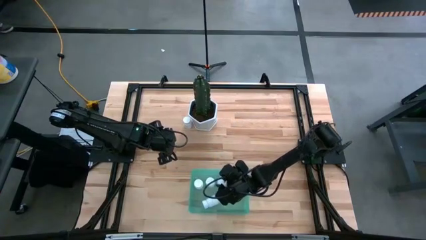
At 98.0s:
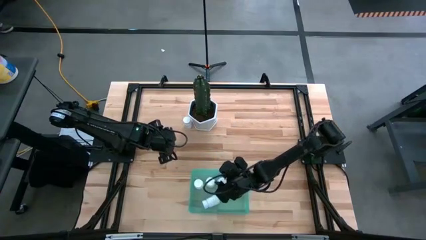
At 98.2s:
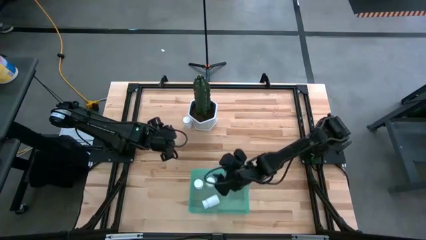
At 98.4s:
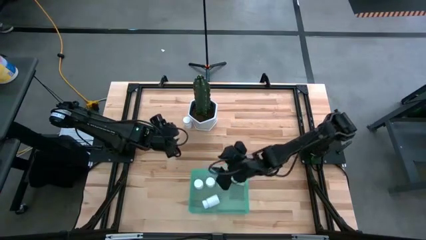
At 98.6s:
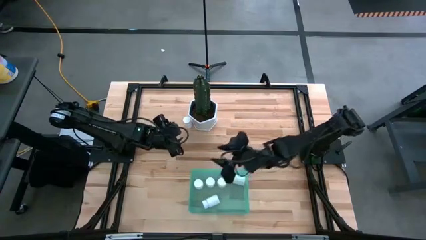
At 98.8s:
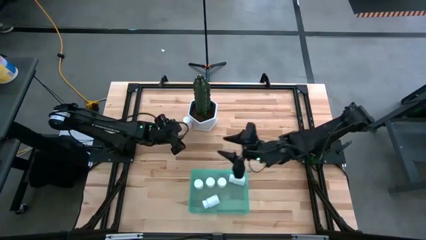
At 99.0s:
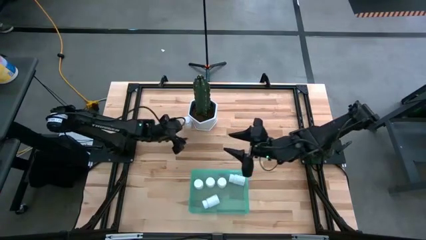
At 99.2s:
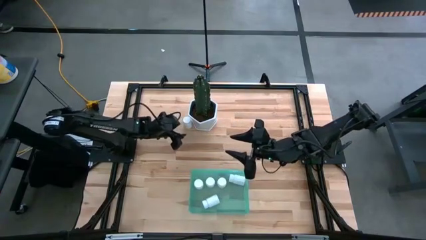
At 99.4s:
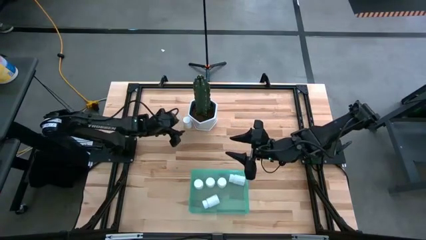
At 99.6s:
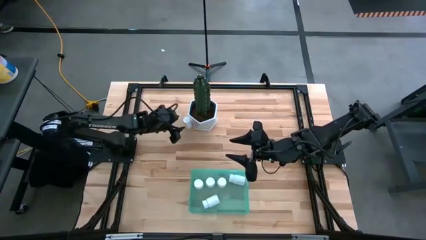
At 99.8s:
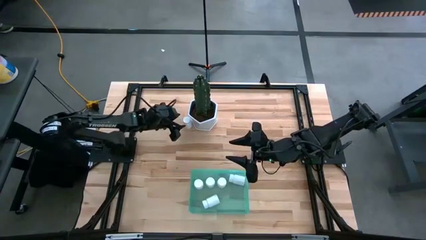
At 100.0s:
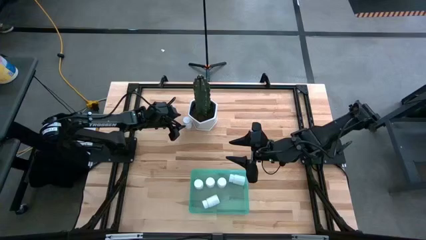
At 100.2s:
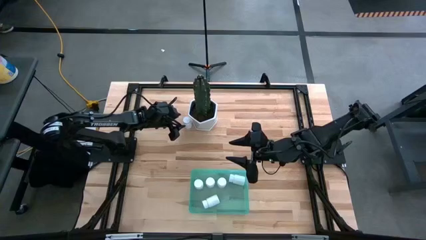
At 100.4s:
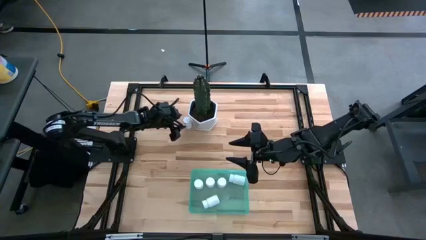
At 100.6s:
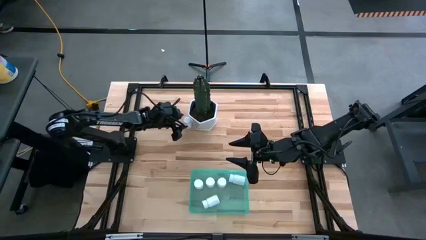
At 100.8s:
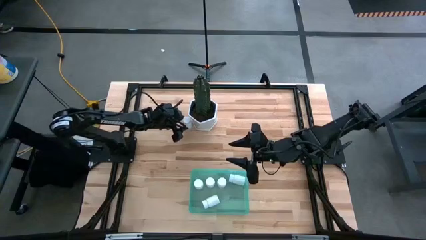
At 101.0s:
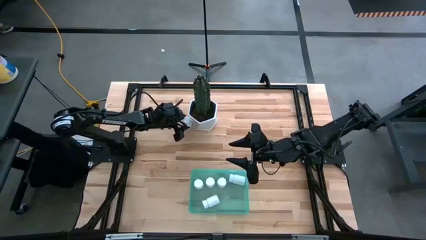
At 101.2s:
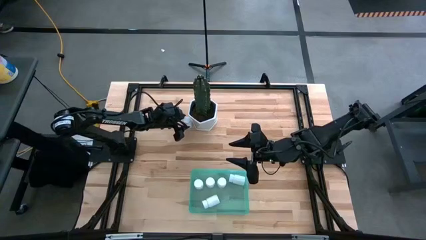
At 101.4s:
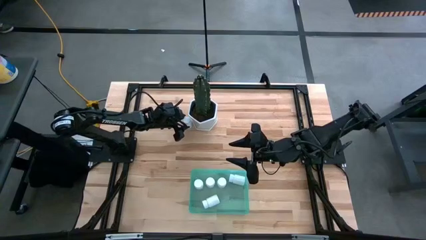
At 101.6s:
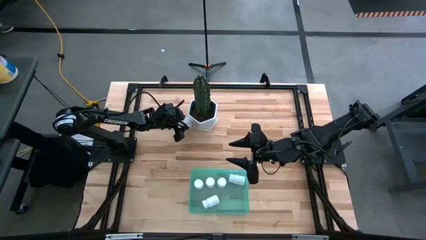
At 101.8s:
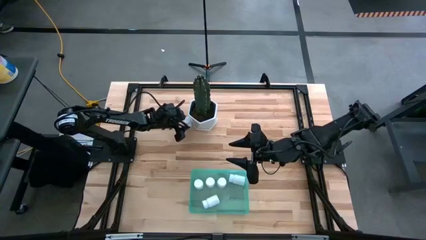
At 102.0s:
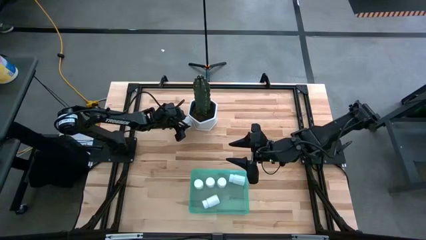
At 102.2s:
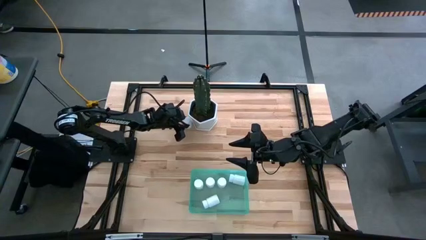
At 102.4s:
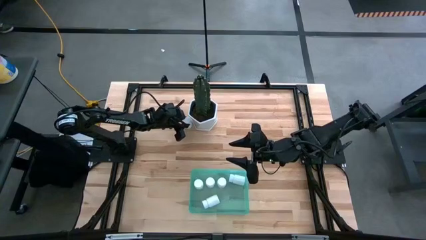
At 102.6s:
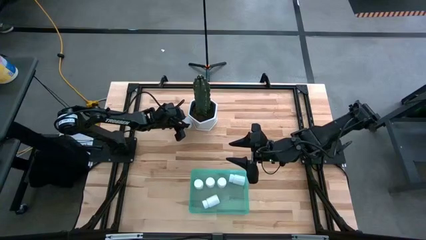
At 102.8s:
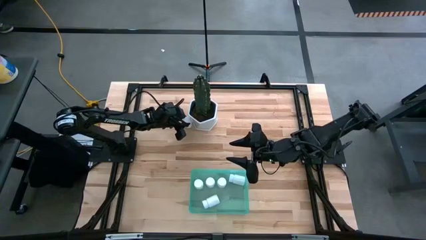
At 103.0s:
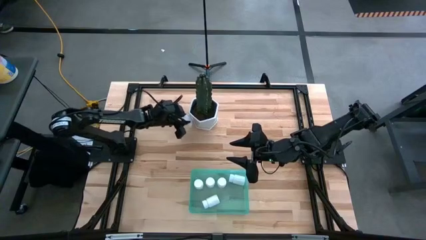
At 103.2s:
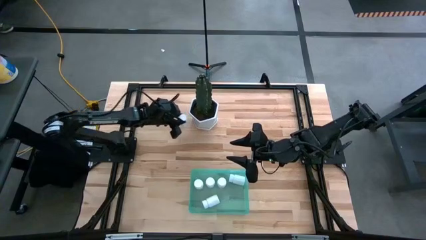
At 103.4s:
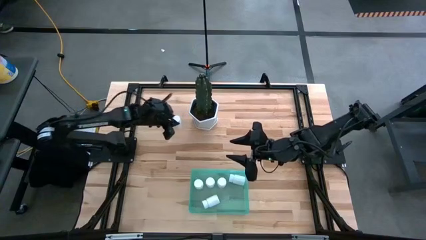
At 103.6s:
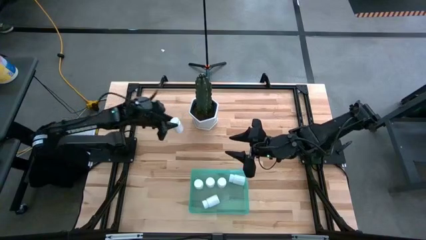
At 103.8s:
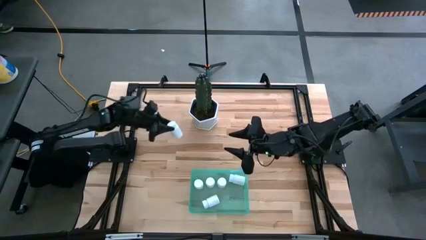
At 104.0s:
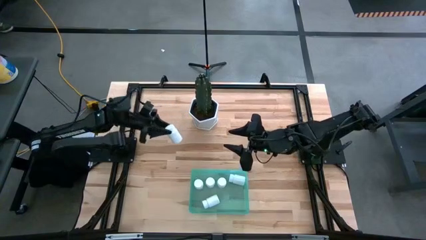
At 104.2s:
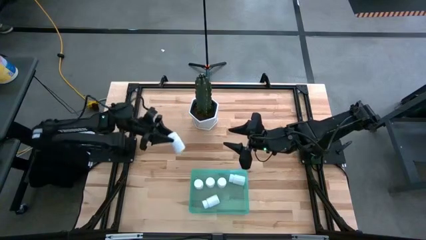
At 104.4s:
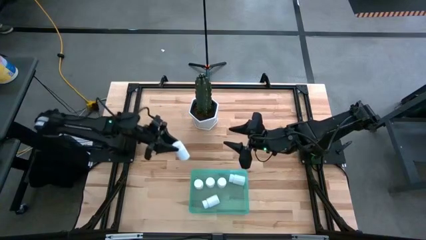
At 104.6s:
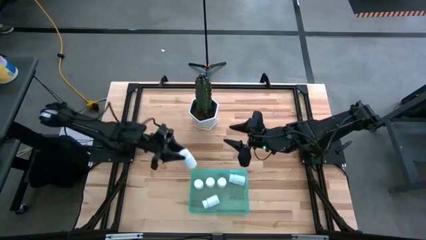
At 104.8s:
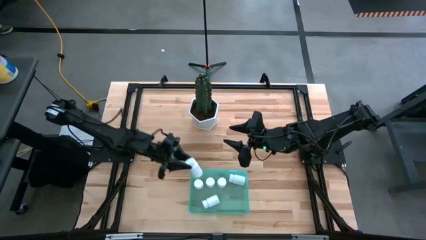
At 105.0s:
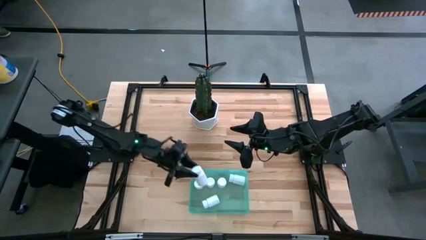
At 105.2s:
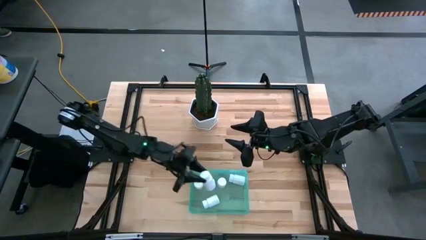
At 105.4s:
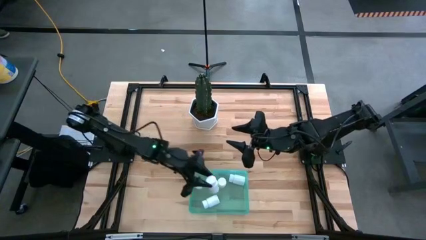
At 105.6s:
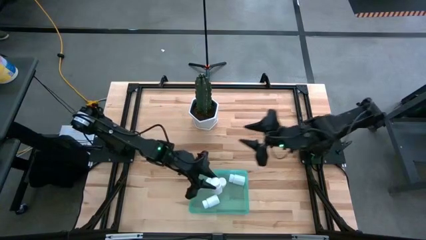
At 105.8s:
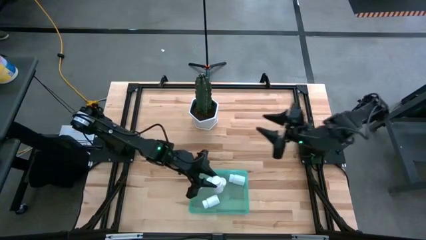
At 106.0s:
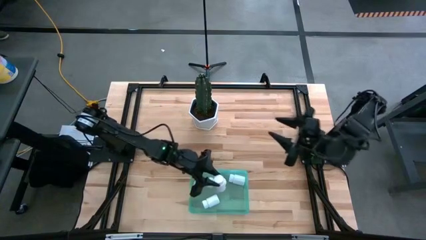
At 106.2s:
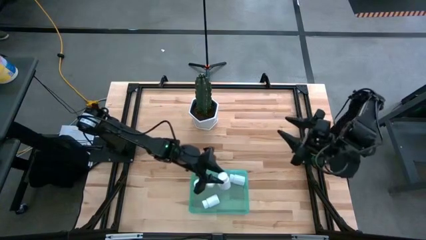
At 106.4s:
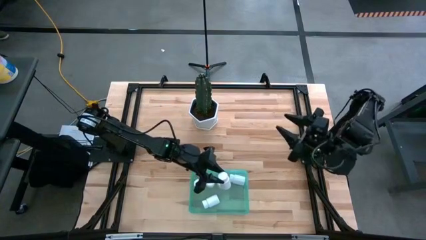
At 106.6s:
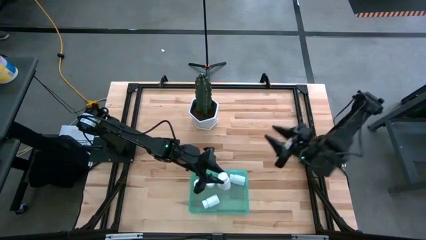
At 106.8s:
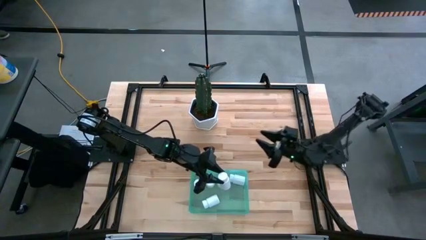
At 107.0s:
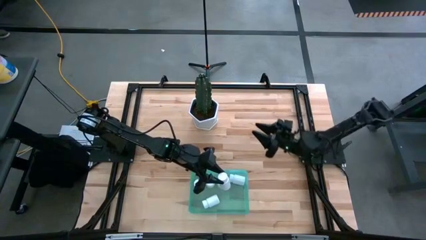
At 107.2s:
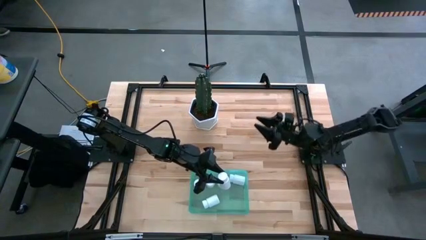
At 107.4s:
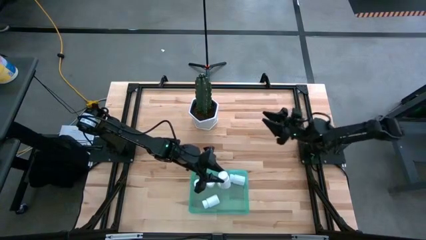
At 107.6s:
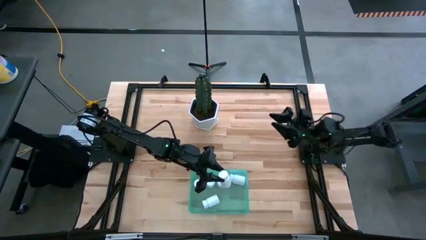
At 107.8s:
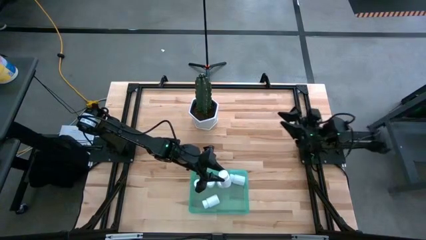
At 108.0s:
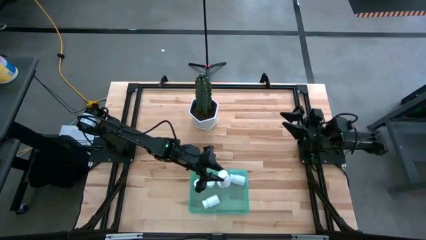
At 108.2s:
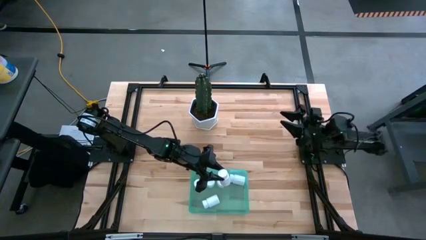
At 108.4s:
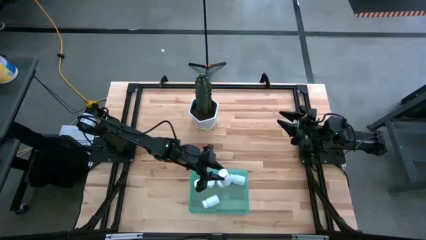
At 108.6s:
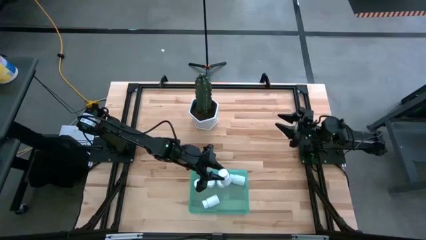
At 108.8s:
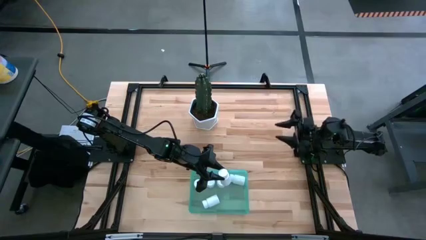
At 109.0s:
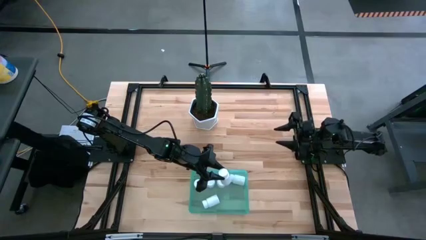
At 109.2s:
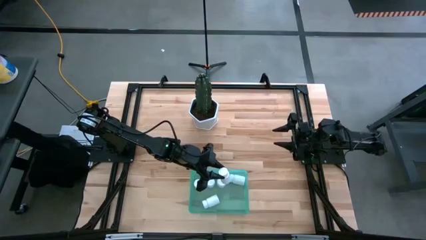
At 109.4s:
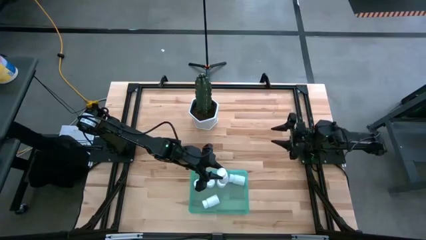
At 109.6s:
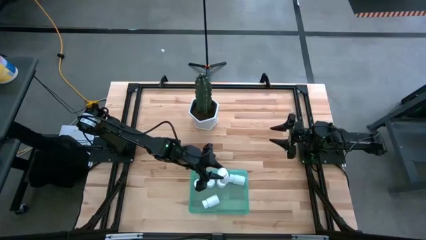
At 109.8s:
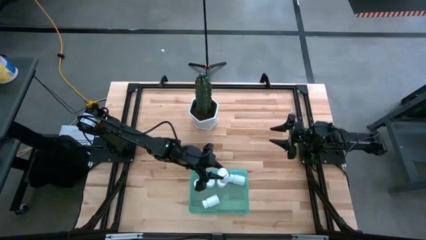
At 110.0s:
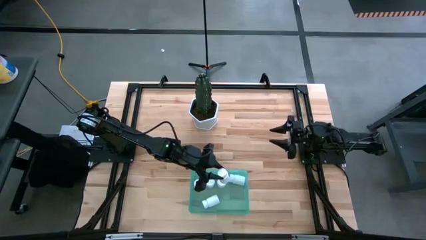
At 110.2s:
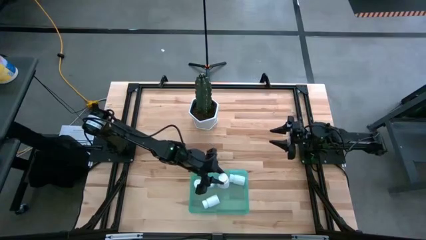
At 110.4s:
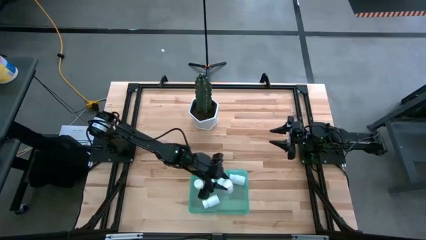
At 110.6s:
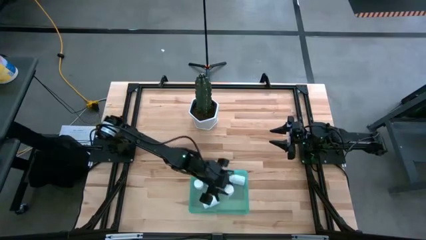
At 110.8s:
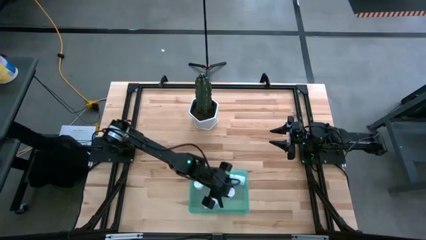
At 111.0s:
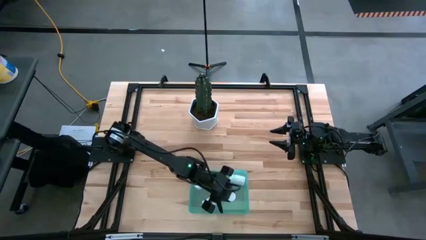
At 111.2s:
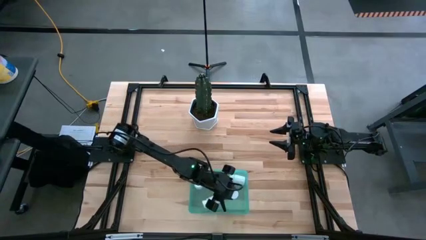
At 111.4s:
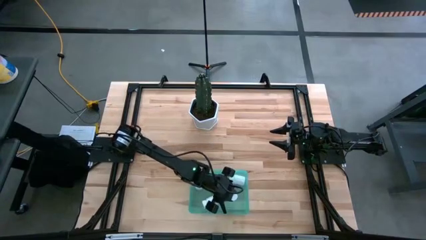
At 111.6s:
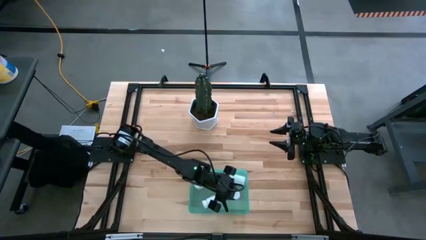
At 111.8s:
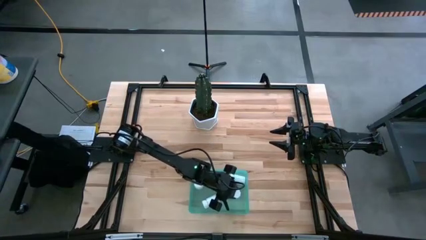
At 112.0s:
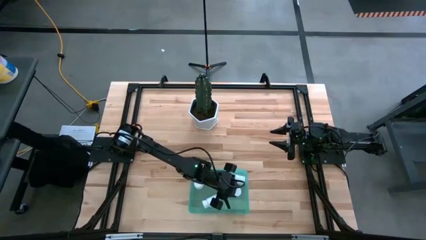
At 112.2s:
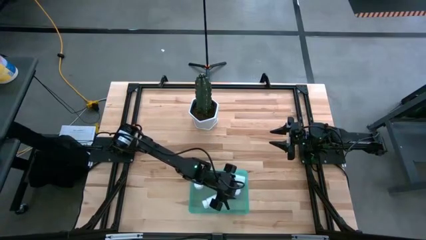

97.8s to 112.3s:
Task: Pick and place pill bottles into a basket
Put the white pill bottle into the green bin
